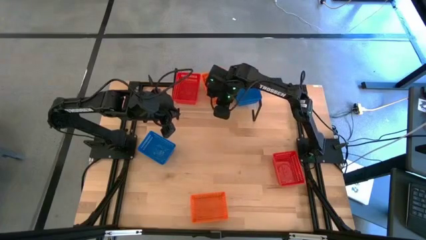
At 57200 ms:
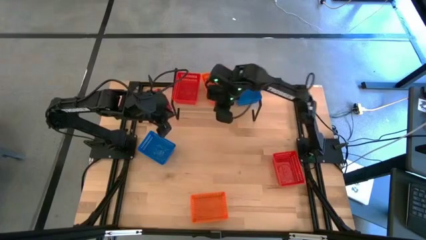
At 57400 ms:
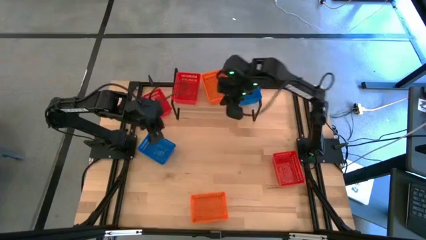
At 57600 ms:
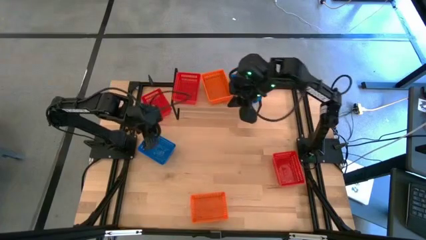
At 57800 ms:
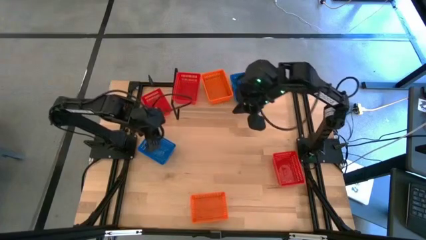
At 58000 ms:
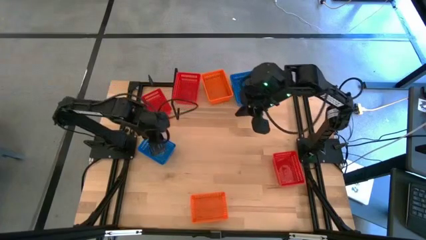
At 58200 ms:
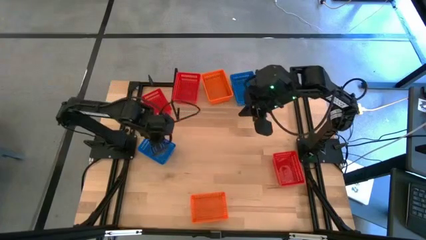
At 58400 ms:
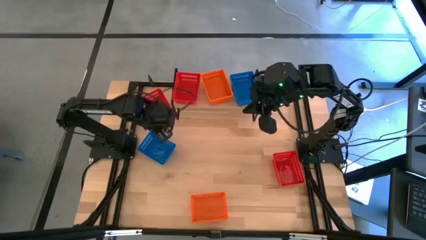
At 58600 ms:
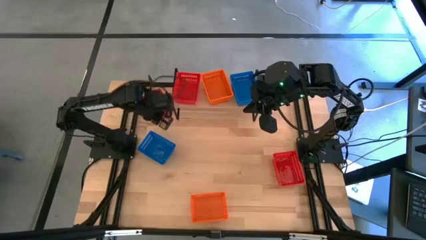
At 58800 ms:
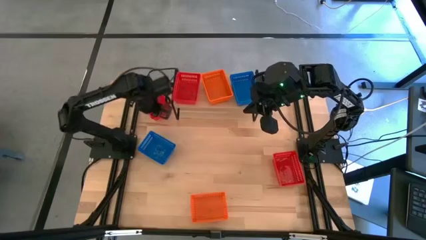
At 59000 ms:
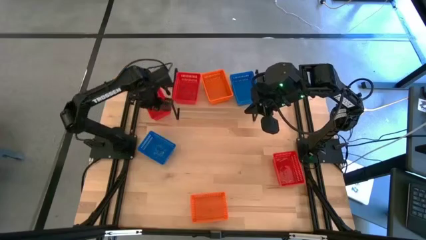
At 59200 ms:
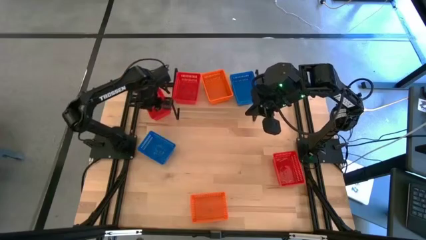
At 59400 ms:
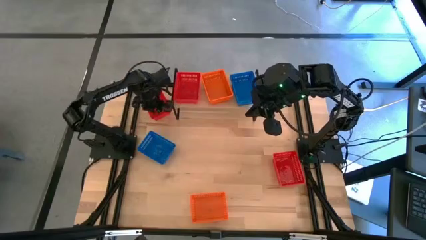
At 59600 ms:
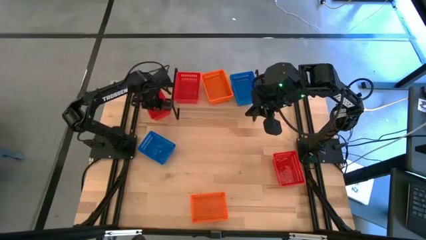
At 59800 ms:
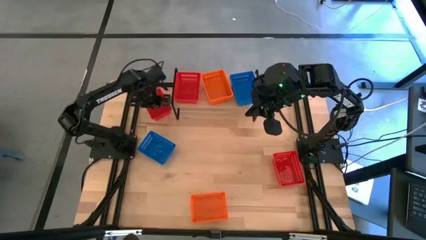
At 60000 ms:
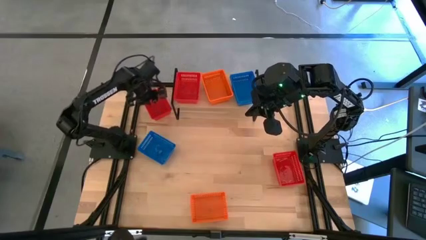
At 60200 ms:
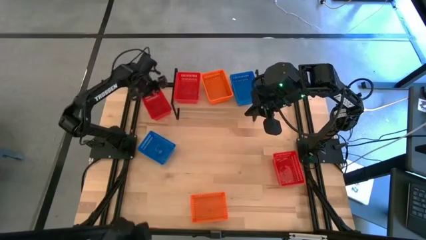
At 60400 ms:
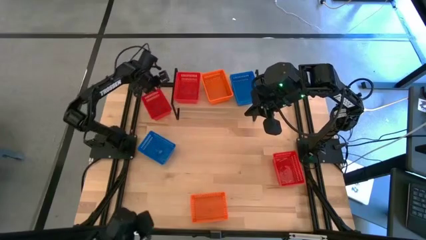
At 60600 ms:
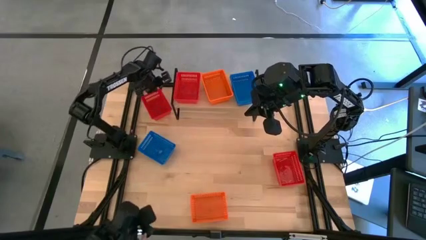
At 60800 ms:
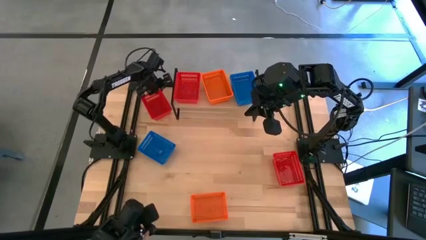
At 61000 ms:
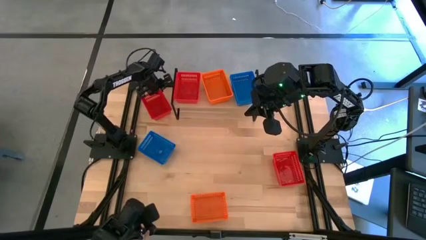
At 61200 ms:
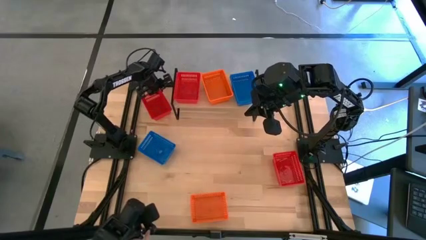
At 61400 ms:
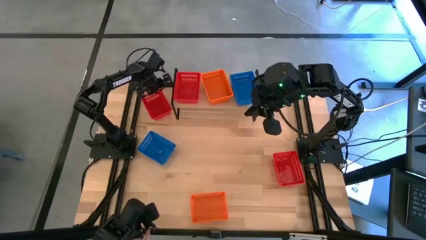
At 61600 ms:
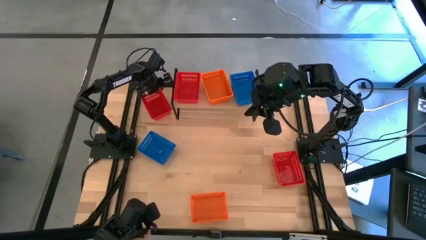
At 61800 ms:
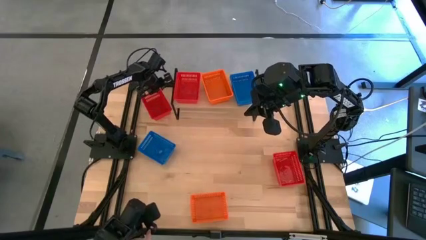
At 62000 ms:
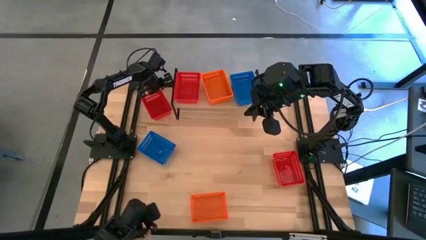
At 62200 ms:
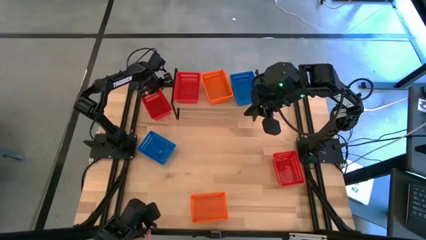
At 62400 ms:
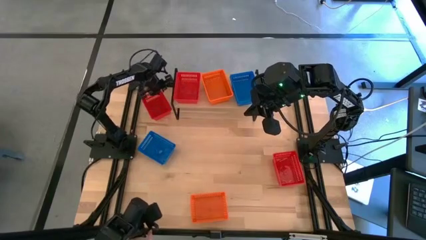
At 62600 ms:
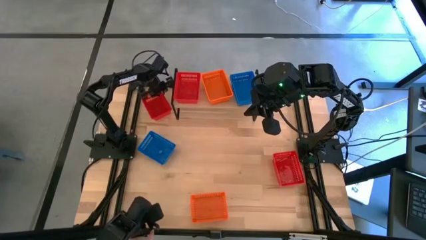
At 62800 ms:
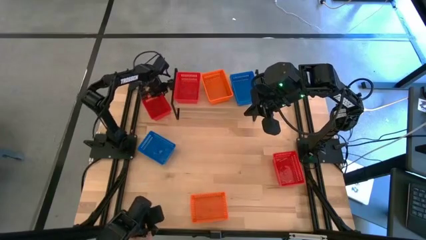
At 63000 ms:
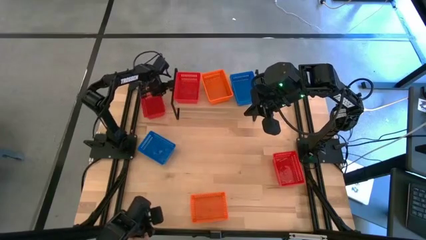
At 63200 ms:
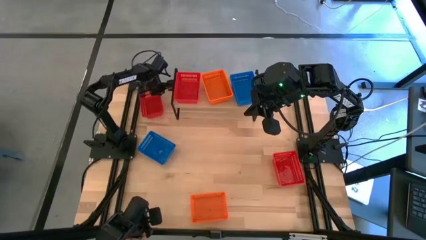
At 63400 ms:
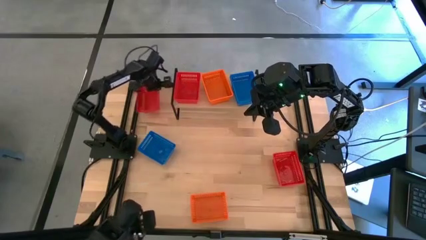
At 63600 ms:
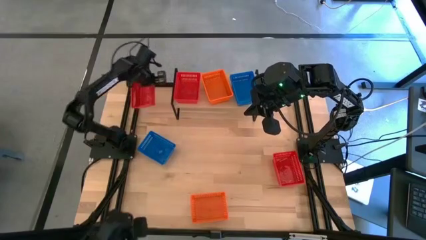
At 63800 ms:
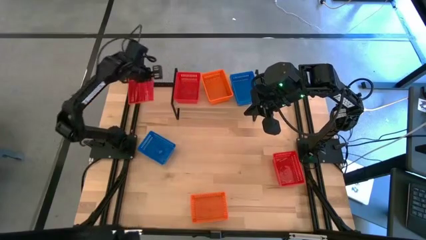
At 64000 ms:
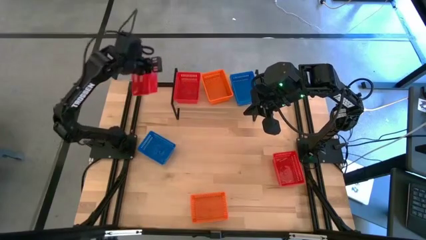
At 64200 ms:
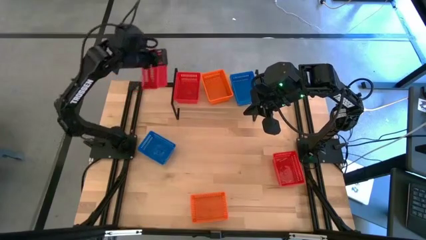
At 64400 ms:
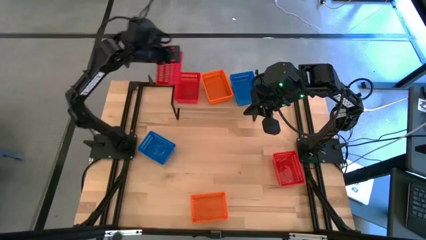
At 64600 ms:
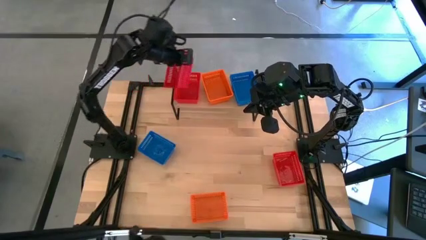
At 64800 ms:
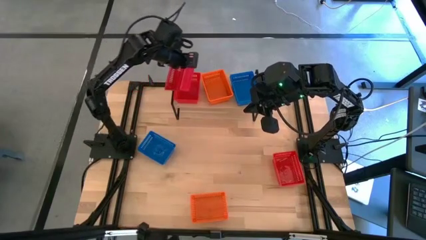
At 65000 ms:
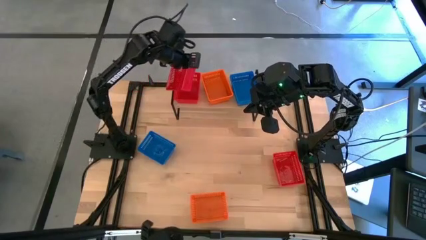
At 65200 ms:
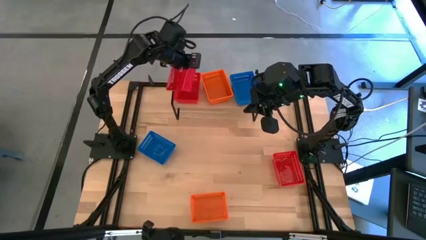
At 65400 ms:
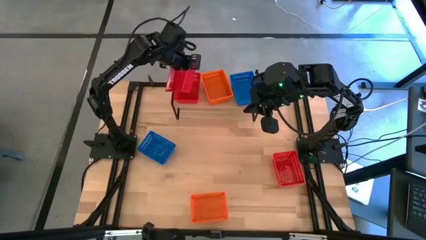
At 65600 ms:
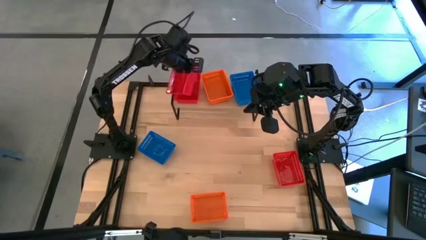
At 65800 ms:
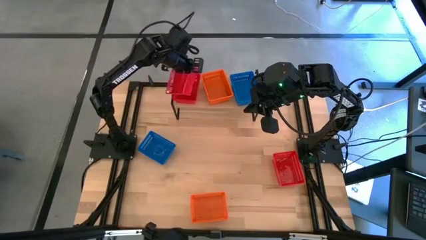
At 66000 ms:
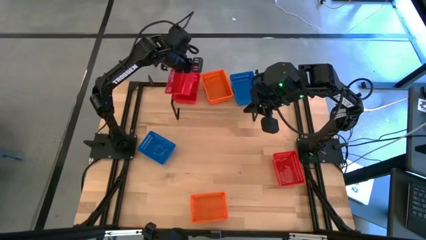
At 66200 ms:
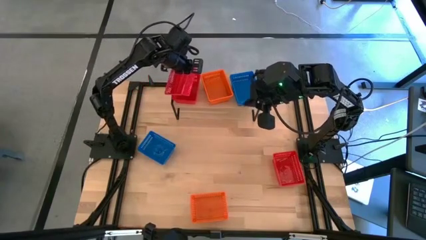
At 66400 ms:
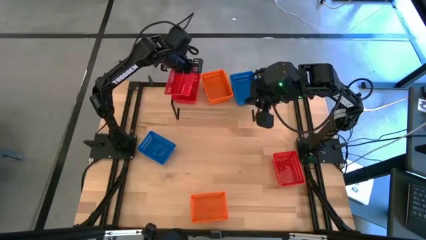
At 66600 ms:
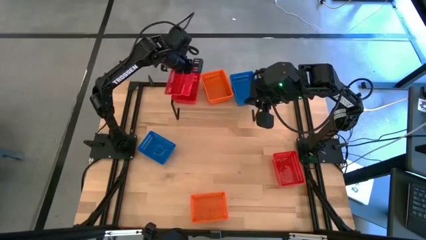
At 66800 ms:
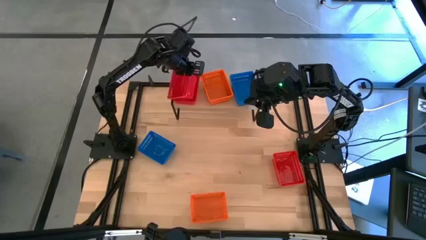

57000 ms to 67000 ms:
Task: Stack baskets on shelf by color
Stack the top red basket into the red basket on the shelf
